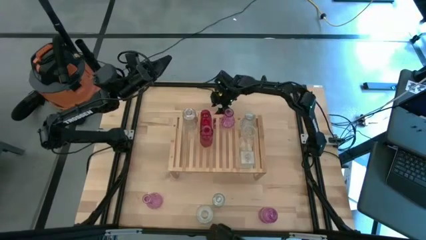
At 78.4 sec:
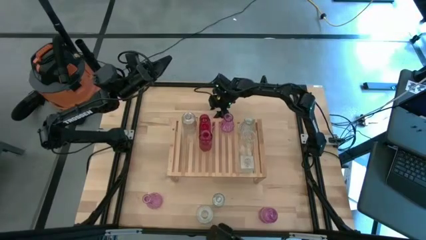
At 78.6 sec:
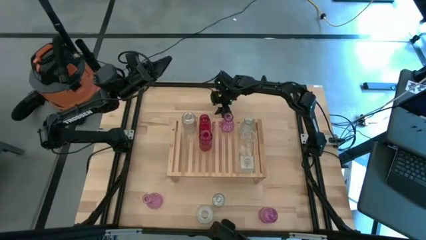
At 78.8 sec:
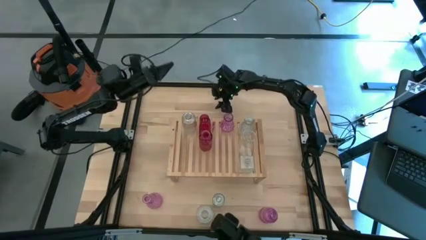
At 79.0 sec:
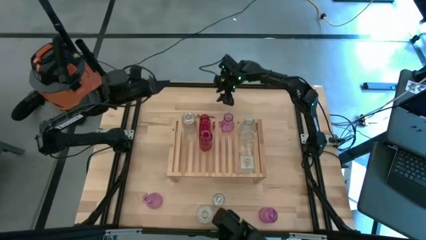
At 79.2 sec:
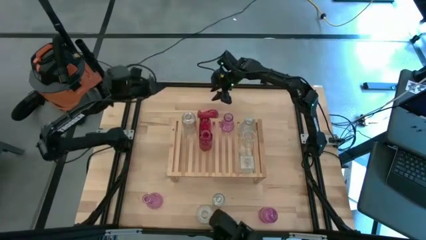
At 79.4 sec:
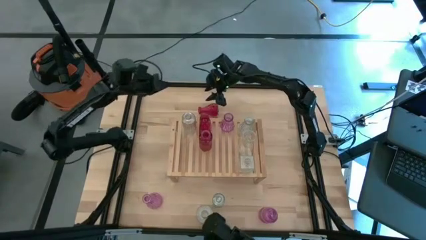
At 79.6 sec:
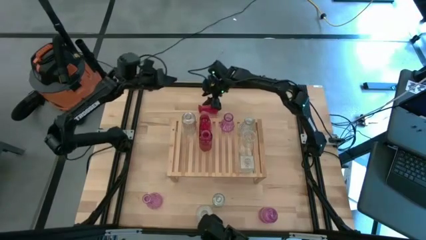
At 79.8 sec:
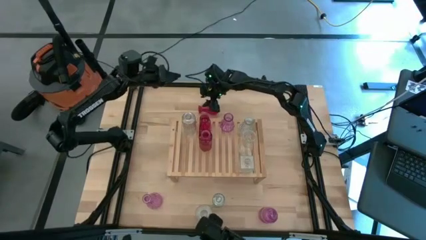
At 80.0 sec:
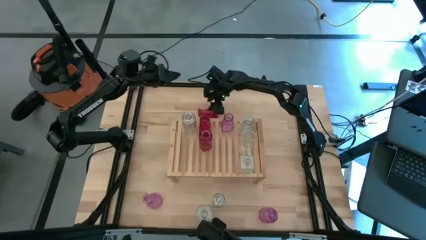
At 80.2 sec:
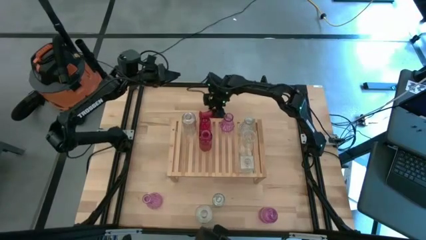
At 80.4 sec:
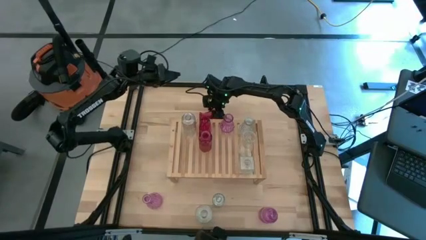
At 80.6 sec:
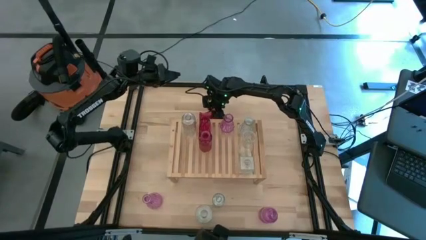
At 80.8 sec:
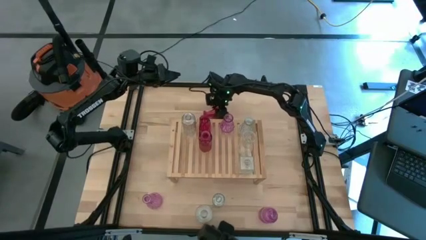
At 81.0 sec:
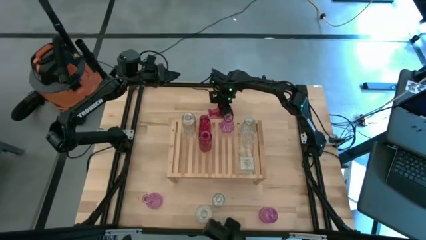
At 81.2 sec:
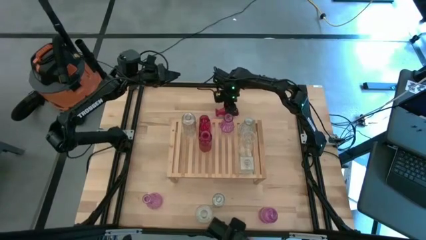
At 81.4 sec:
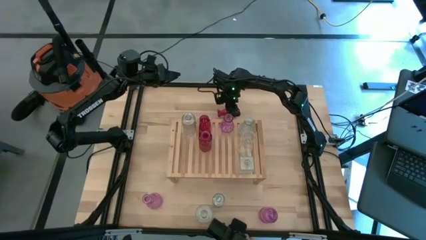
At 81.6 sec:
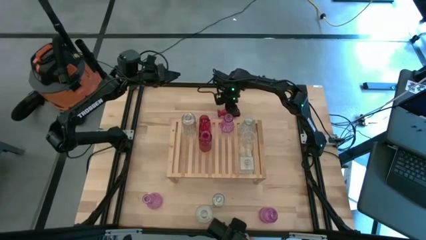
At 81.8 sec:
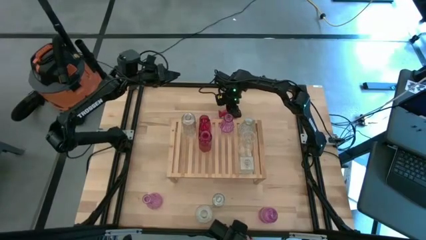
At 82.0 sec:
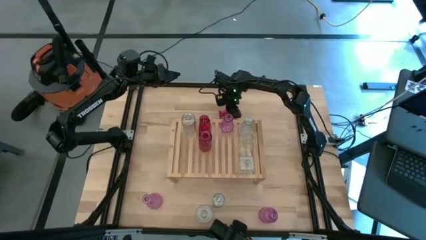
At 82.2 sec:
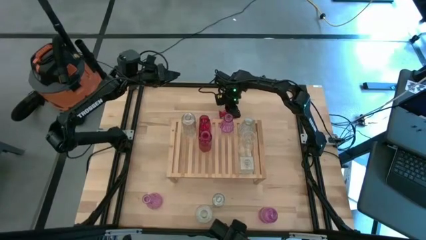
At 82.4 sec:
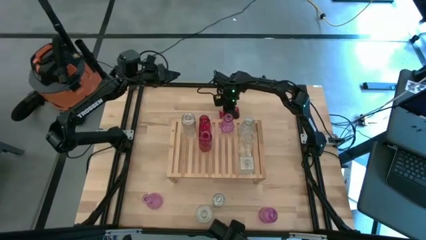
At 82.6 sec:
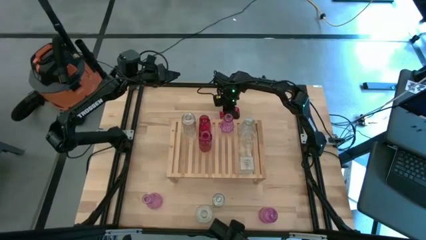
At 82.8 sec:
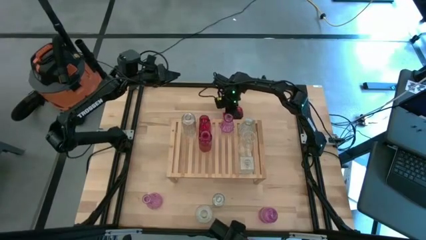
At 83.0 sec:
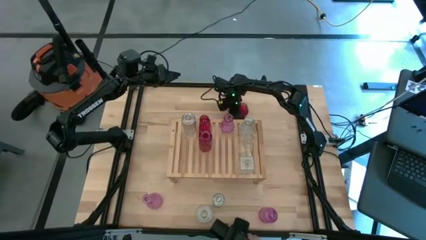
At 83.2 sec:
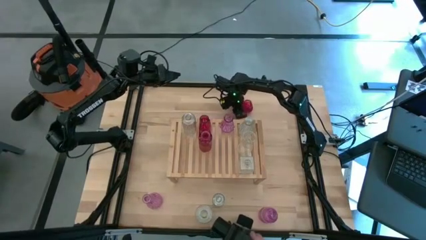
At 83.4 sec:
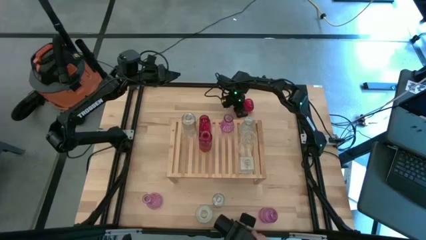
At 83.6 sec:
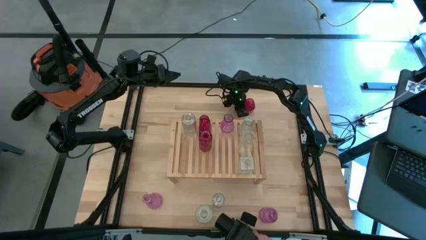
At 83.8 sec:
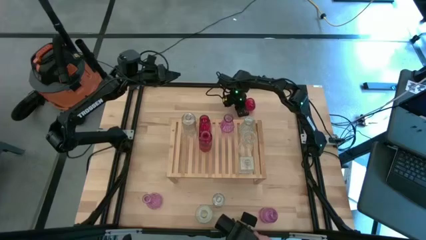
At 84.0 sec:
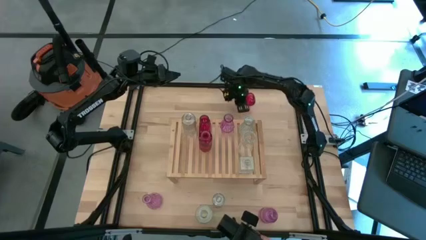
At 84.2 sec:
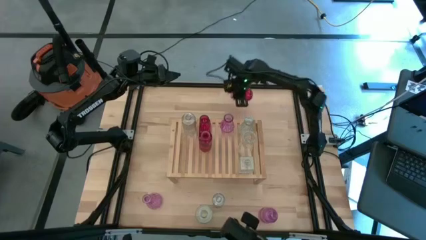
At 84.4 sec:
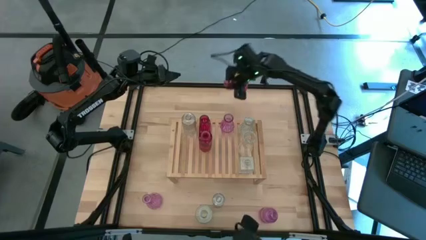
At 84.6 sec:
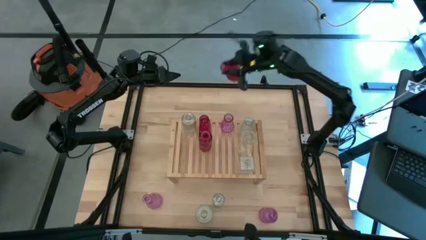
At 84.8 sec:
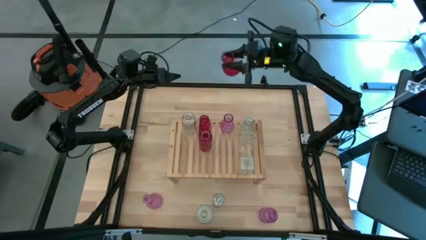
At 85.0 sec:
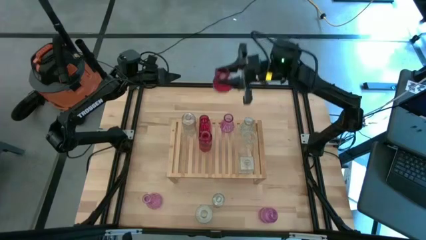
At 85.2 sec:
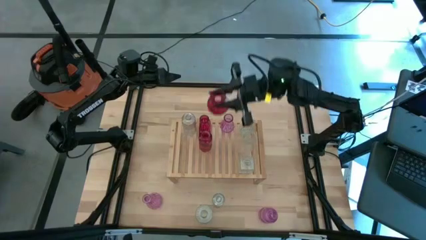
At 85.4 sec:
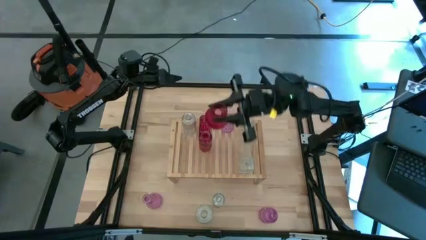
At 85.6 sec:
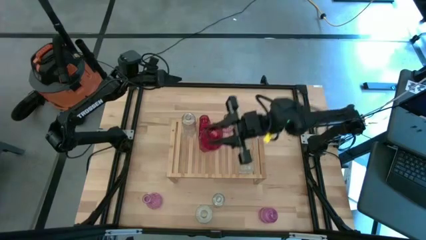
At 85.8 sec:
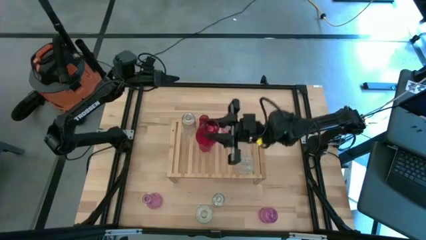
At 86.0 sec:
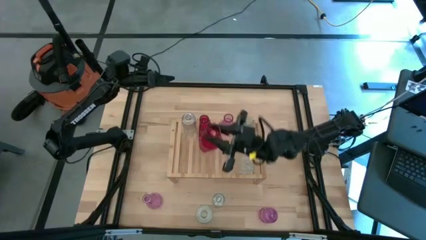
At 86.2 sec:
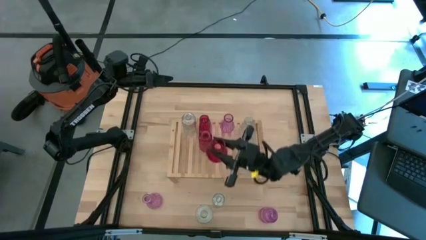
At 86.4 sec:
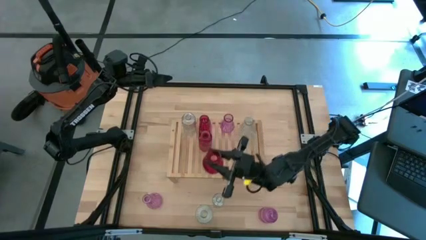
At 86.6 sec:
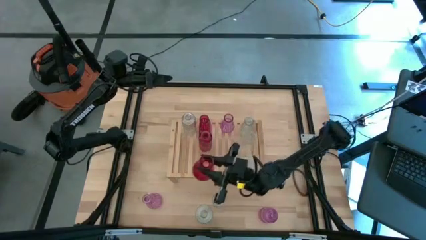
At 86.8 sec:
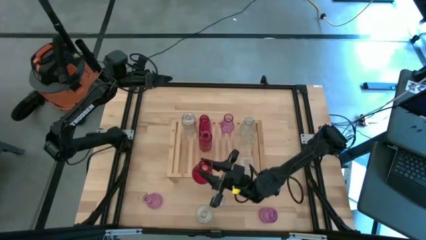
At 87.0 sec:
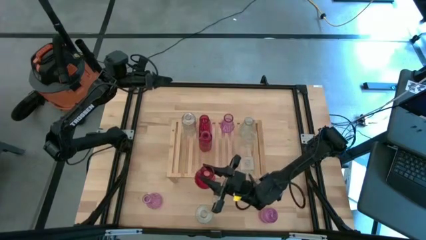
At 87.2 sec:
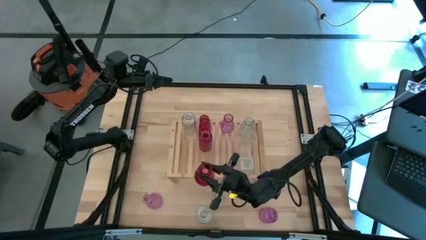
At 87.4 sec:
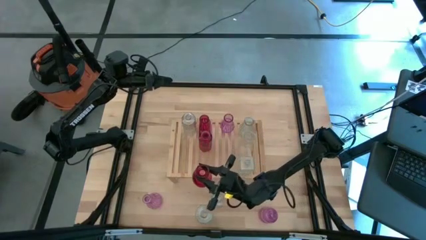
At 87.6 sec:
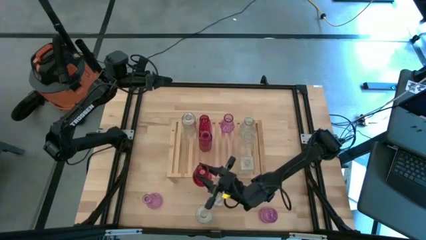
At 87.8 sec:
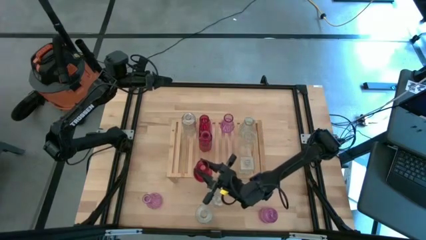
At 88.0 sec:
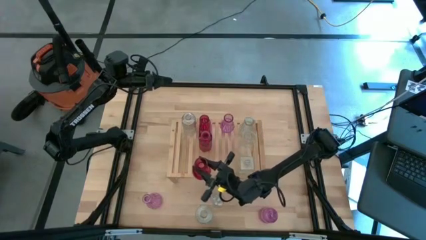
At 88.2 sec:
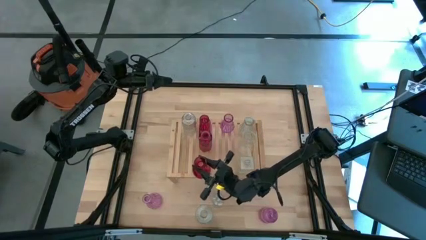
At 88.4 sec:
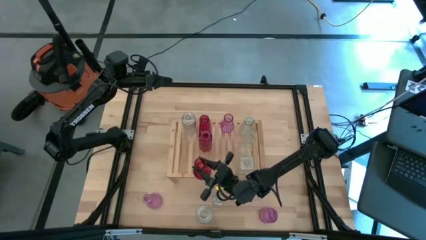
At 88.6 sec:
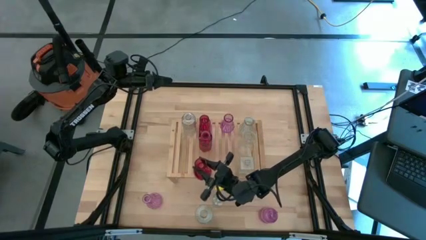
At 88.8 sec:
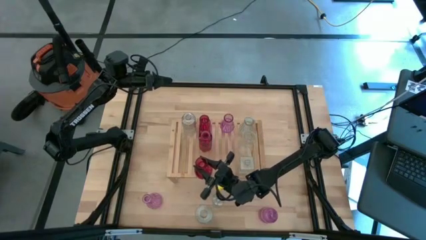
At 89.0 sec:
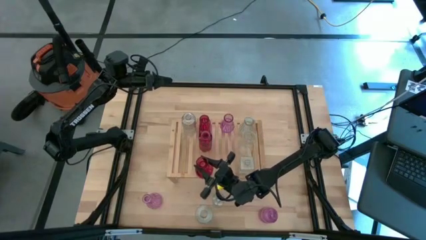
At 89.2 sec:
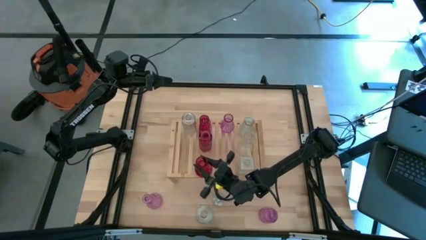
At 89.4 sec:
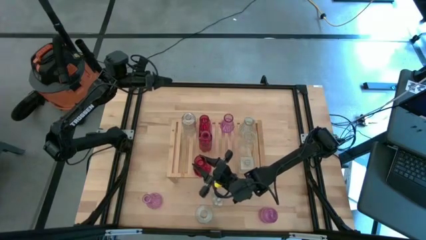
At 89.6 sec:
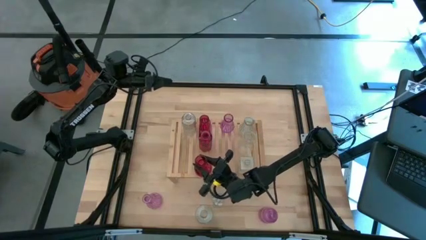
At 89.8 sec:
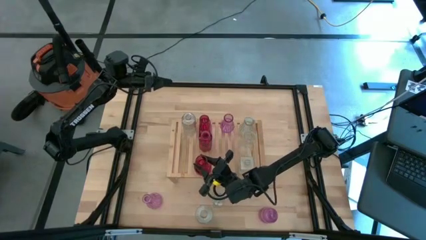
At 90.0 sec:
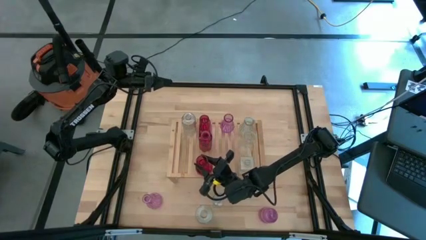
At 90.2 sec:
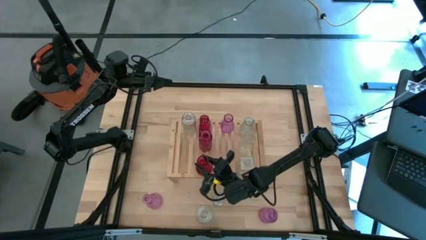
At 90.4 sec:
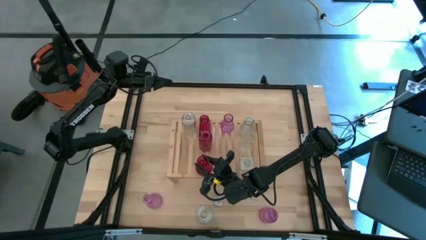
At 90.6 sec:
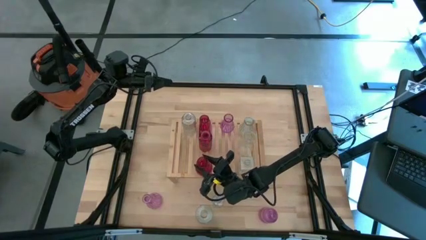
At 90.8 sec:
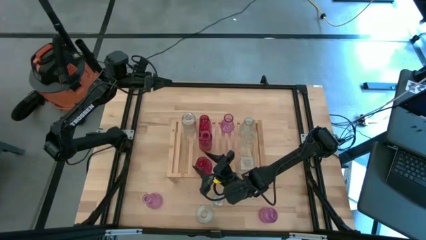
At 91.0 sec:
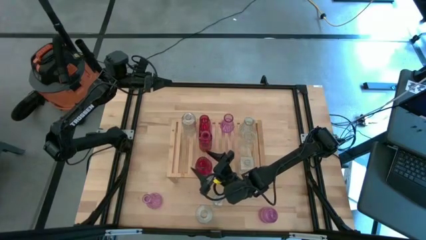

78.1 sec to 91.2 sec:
Task: sort vases onto shelf
Put the red vase on the shelf aligned with the other red vase

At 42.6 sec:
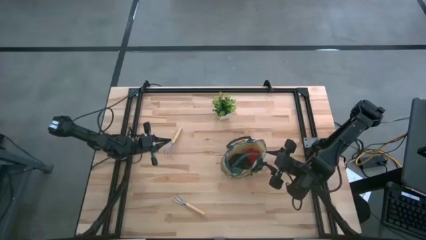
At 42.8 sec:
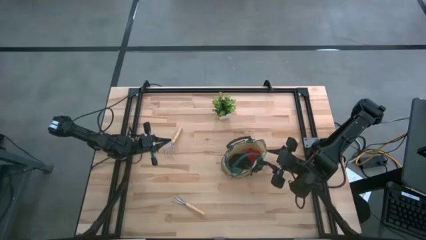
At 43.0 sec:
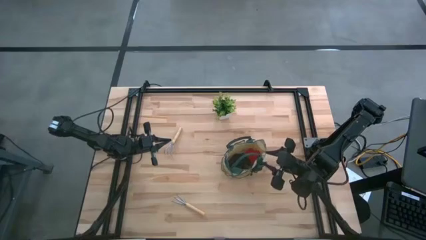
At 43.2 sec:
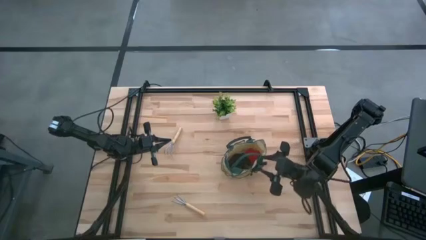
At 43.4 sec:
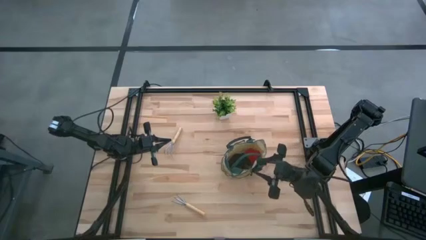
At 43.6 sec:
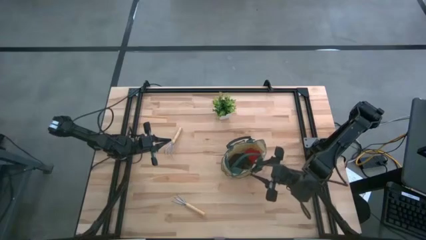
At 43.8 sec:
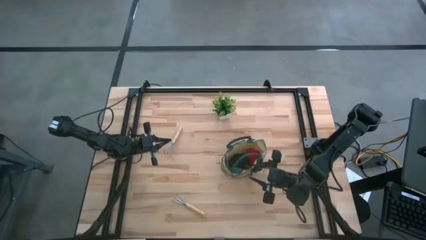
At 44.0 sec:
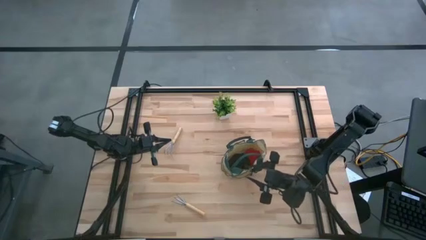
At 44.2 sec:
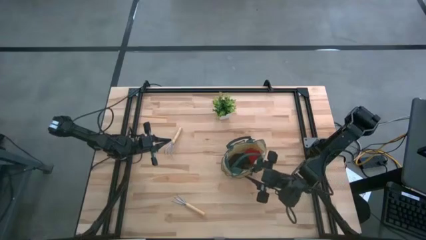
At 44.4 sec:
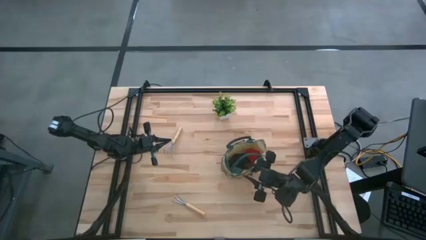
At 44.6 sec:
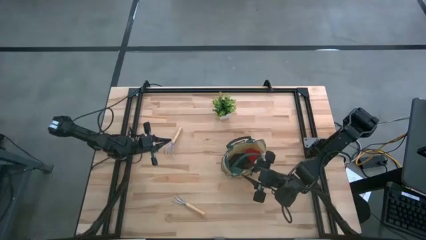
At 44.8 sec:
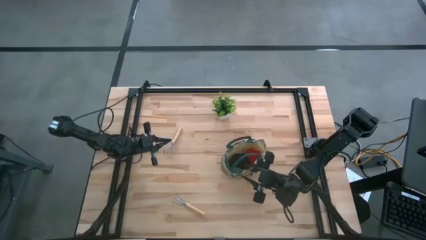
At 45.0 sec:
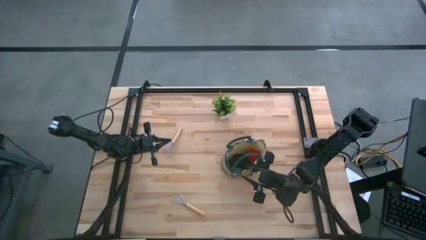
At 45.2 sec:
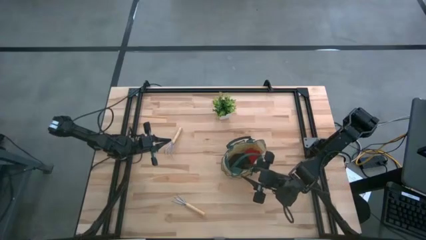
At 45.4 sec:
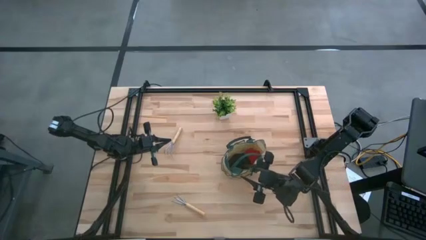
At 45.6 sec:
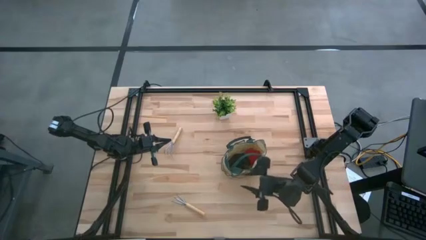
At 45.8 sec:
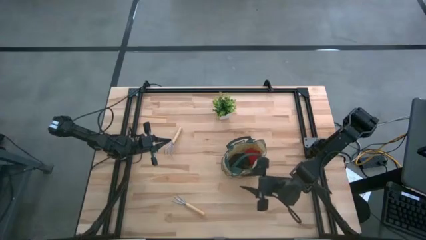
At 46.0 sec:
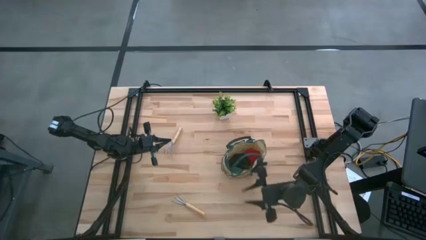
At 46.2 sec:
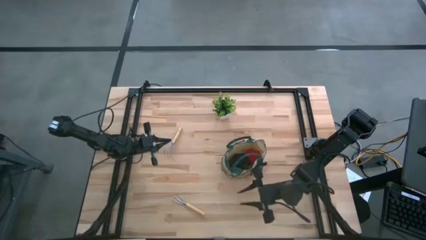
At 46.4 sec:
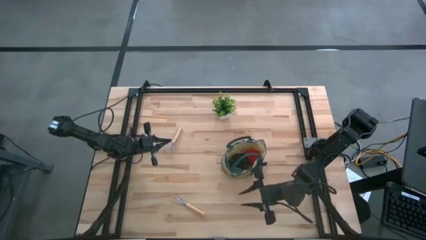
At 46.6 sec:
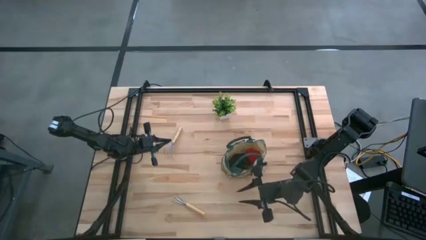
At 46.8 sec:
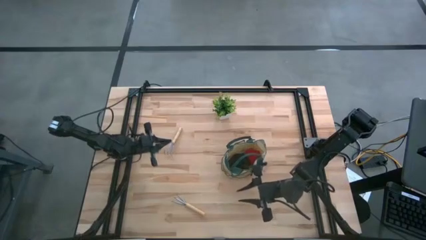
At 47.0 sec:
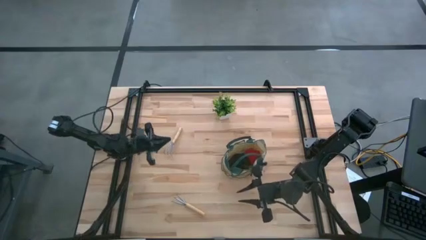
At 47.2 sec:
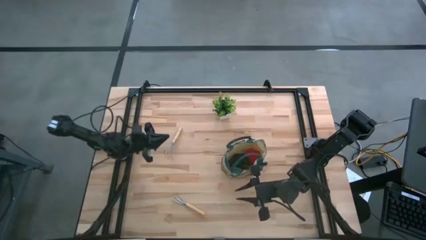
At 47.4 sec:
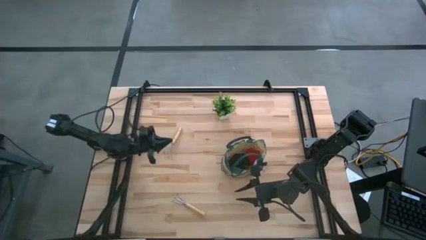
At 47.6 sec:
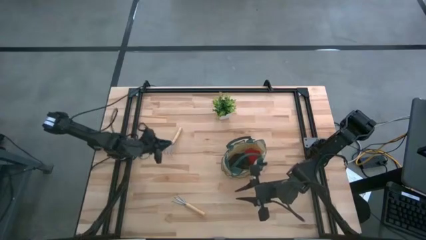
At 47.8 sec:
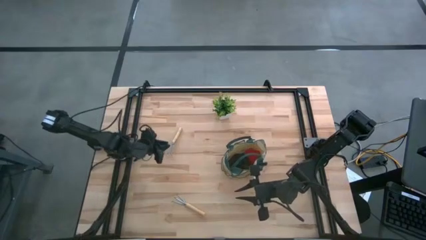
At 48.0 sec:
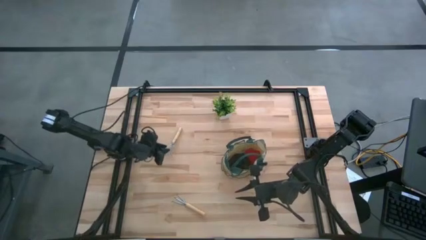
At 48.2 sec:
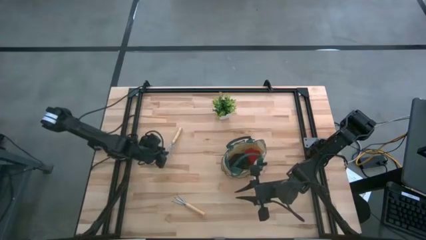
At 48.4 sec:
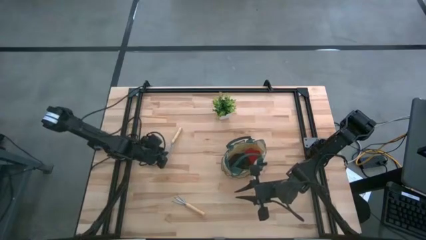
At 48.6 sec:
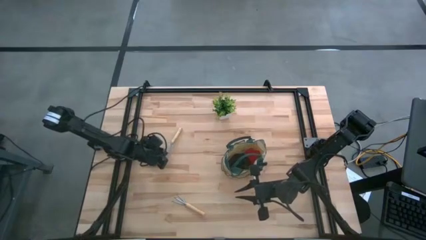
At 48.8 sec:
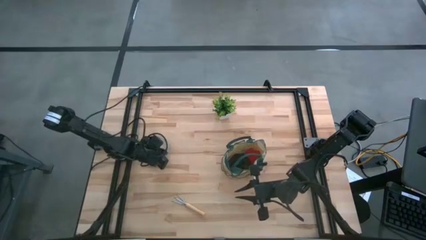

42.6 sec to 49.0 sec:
Task: Pick & Place Garden tools in Gardening bag
Put the top hand rake into the side pocket of the gardening bag
